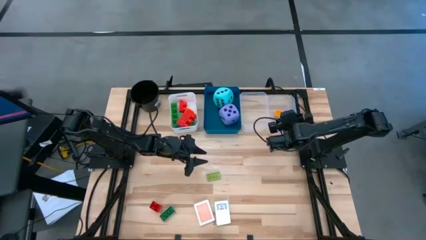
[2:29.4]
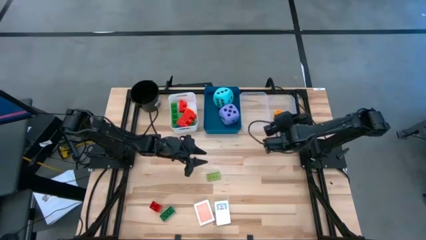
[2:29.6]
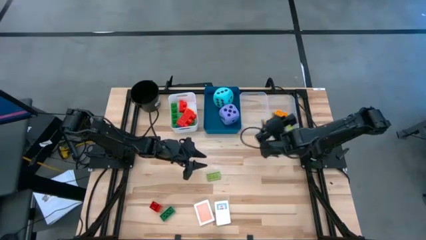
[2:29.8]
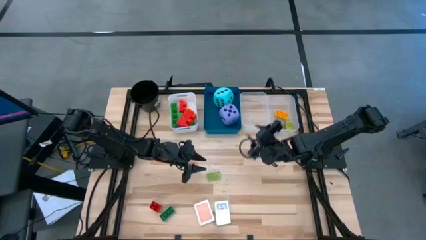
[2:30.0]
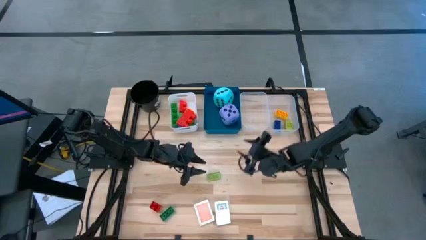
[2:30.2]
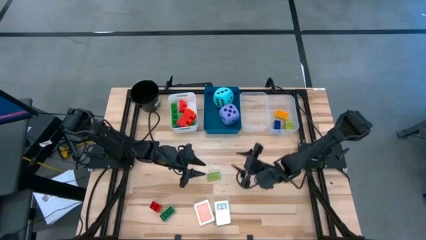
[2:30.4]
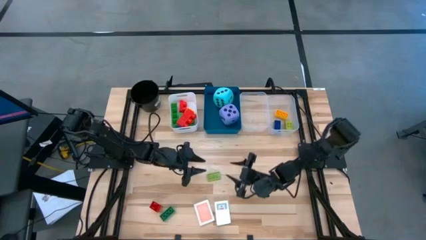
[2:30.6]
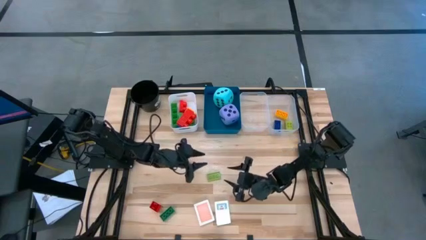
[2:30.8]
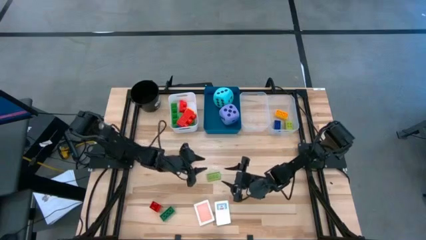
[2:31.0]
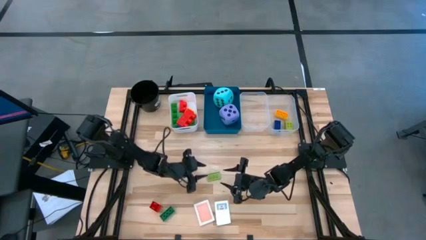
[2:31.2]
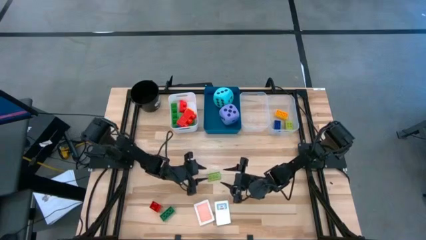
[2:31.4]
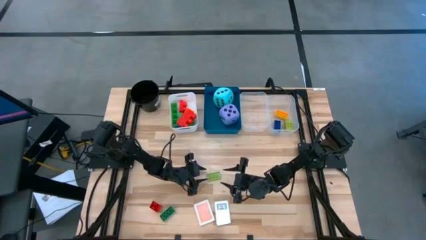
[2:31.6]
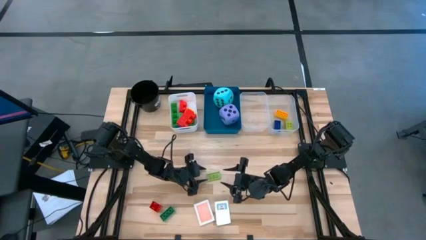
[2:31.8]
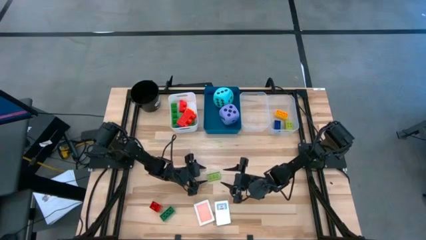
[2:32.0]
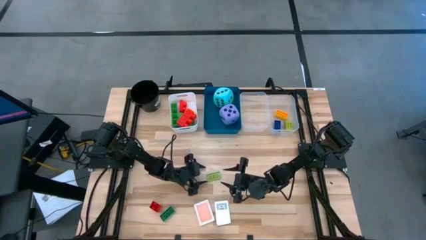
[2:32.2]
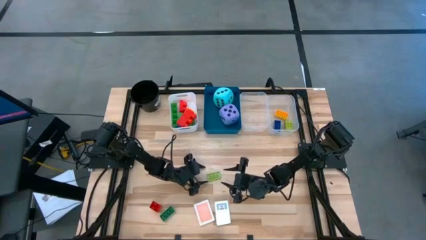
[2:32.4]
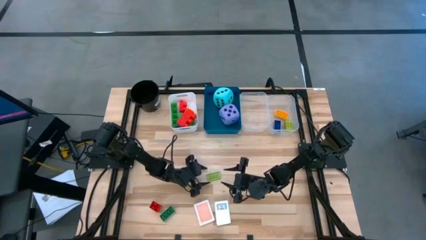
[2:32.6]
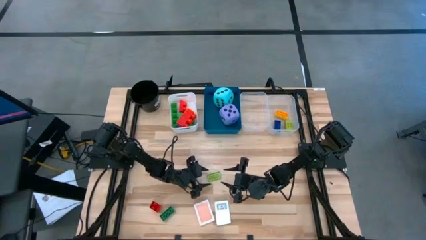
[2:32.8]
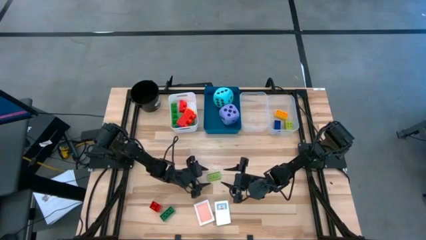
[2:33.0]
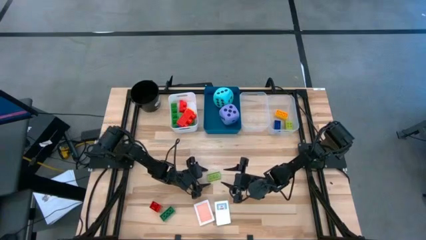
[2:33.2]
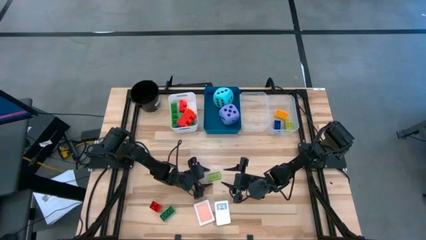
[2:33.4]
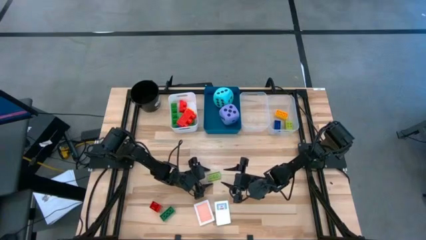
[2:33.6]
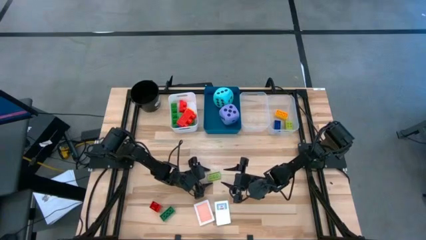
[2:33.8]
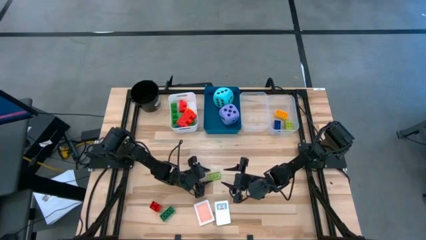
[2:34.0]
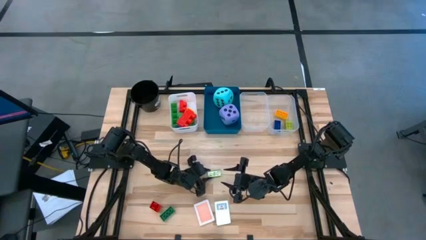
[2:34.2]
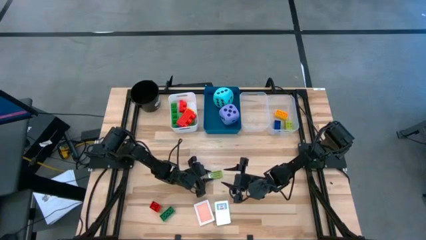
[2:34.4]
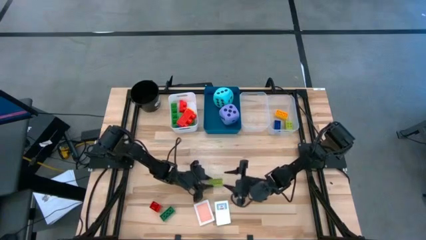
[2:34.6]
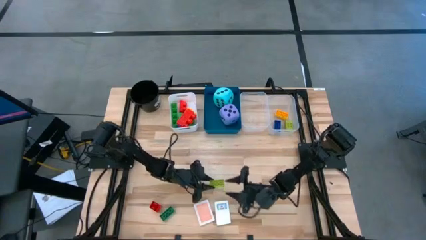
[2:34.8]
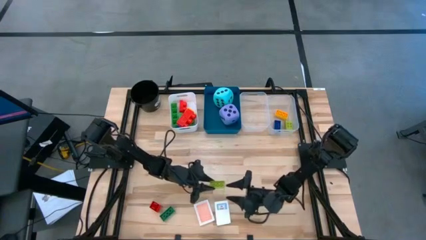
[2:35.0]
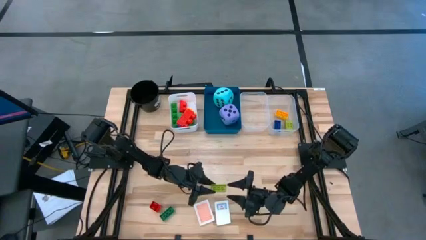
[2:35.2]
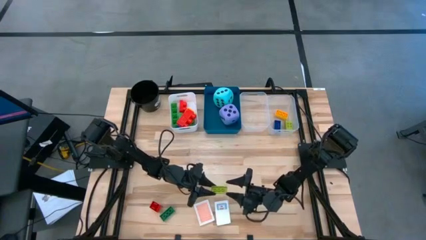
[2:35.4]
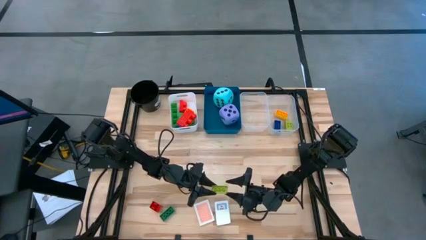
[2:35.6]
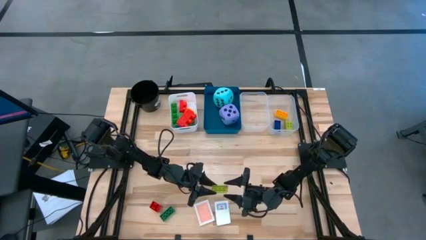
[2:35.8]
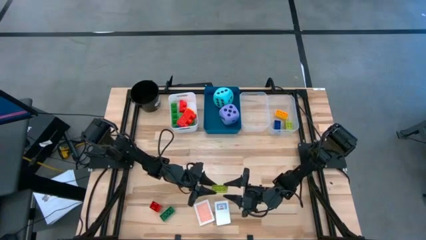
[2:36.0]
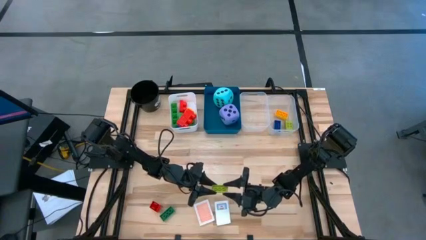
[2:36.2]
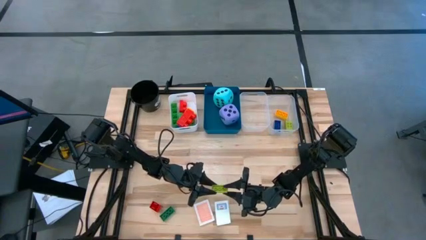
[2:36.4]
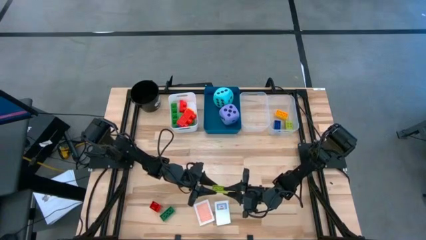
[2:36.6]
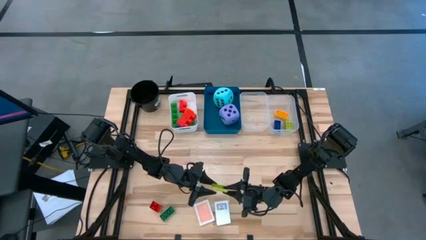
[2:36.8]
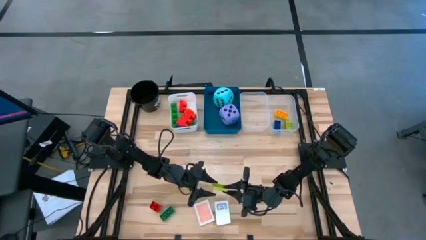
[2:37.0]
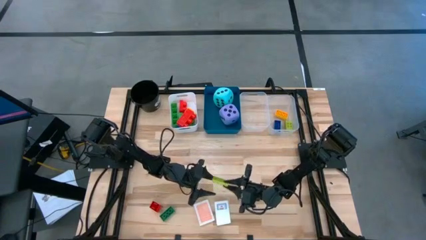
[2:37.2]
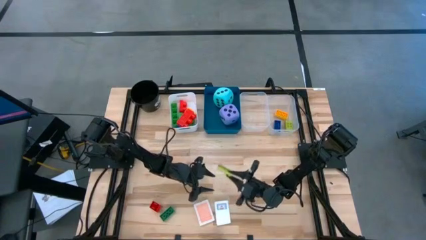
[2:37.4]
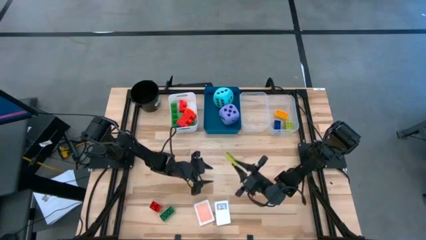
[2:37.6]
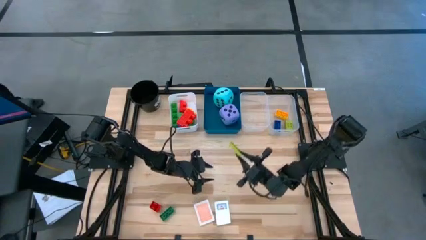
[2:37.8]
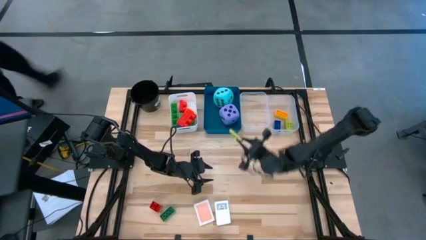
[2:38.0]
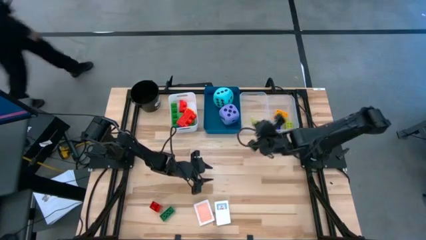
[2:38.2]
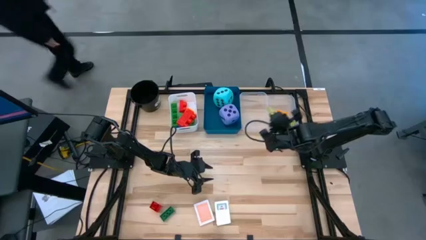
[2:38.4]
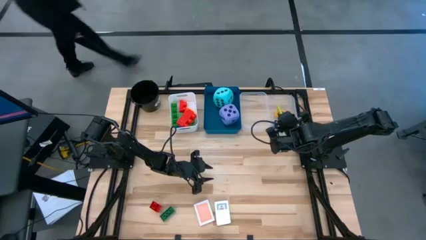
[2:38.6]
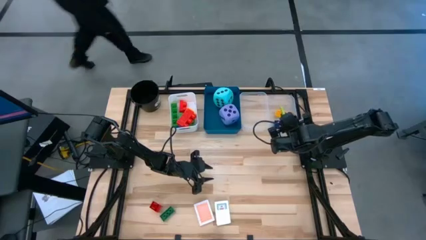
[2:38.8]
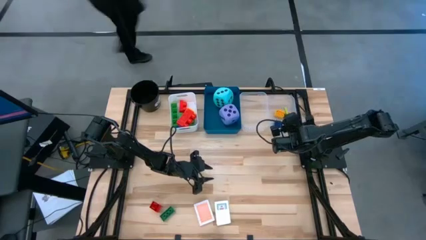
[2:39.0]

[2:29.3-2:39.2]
Task: Pick & Place Toys
Put the small light green game piece into the right transparent bin

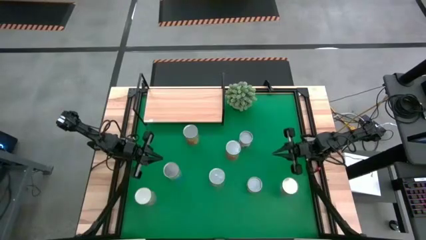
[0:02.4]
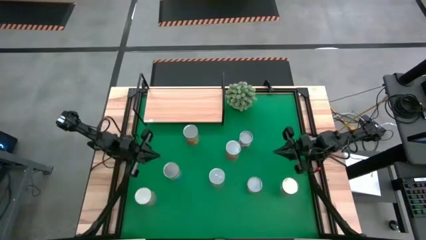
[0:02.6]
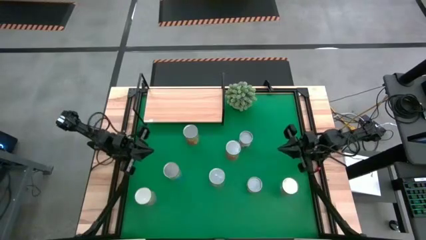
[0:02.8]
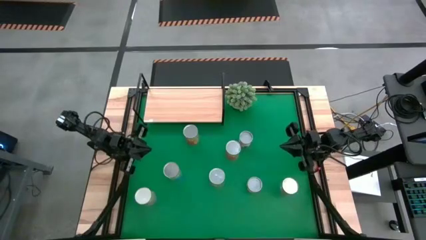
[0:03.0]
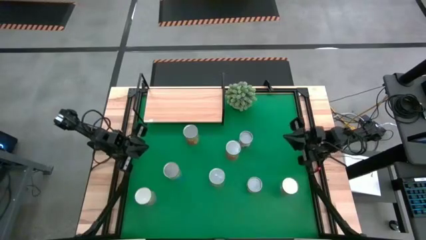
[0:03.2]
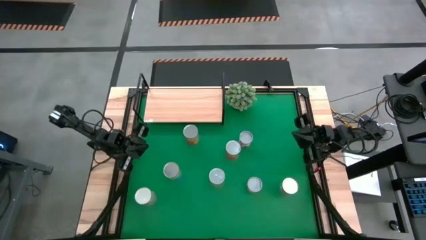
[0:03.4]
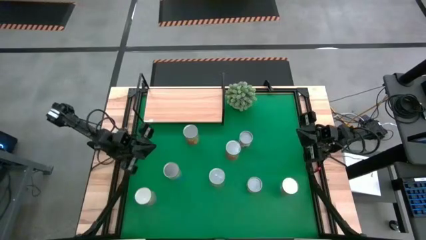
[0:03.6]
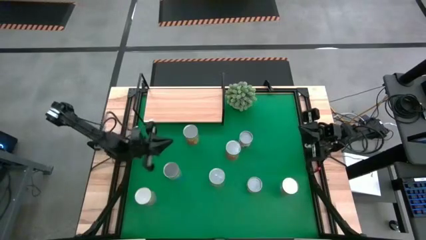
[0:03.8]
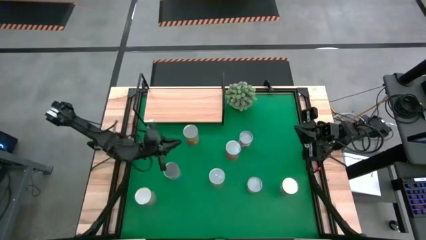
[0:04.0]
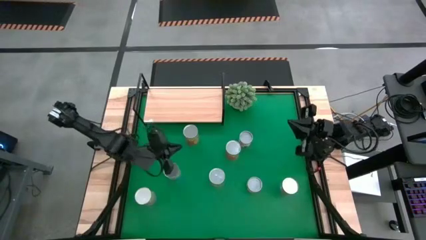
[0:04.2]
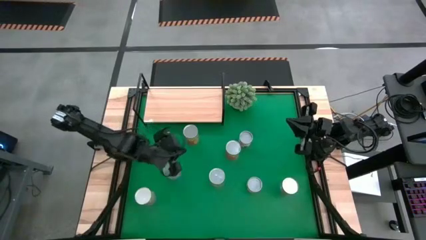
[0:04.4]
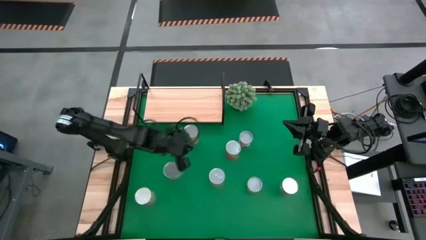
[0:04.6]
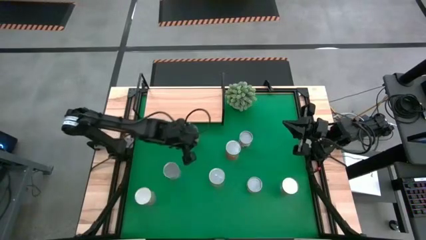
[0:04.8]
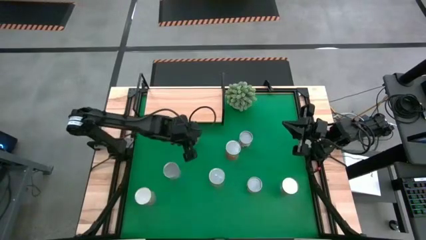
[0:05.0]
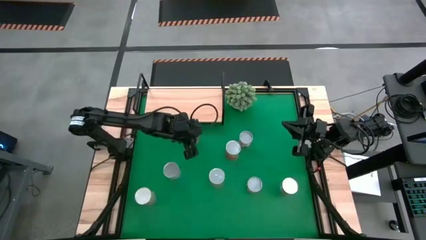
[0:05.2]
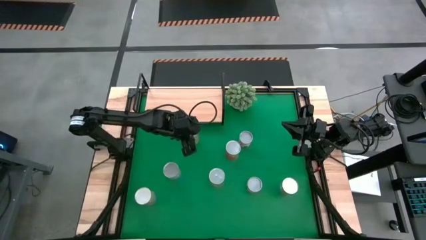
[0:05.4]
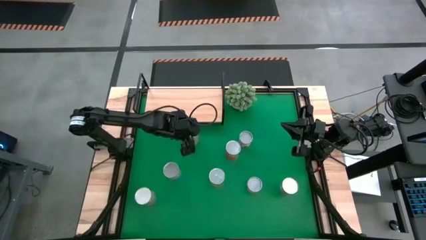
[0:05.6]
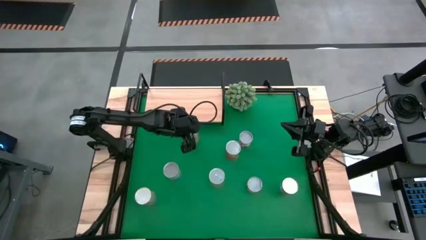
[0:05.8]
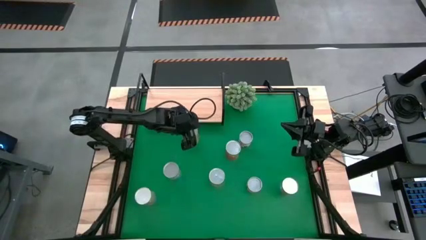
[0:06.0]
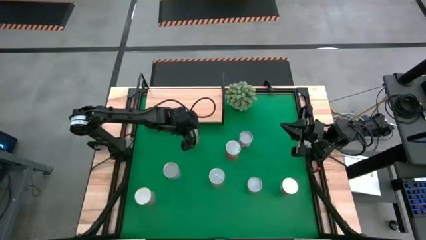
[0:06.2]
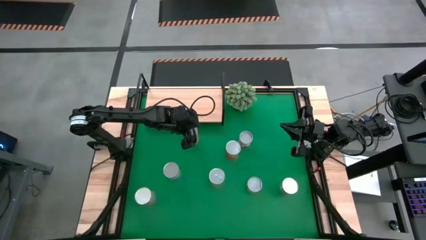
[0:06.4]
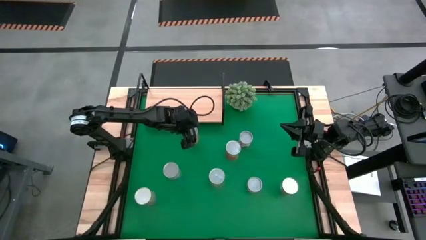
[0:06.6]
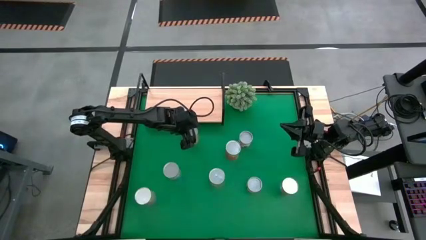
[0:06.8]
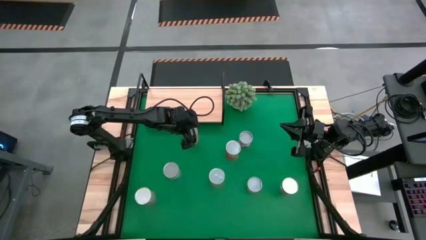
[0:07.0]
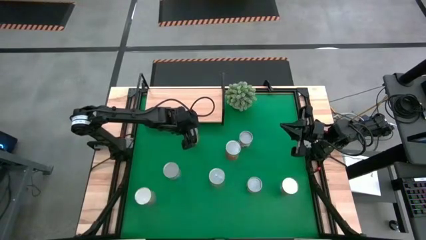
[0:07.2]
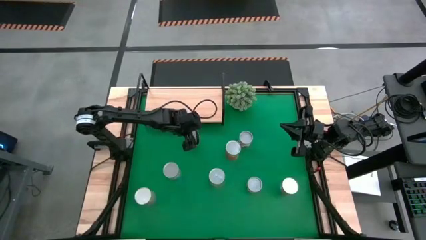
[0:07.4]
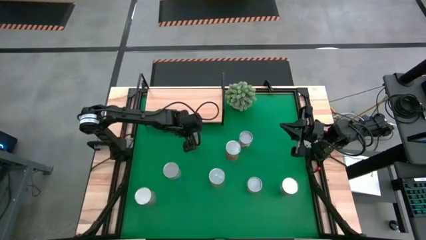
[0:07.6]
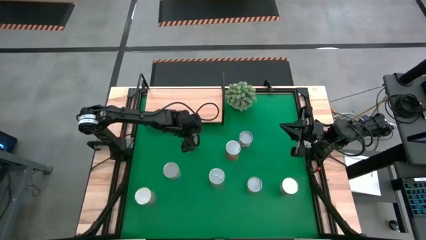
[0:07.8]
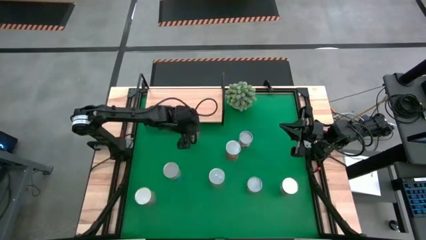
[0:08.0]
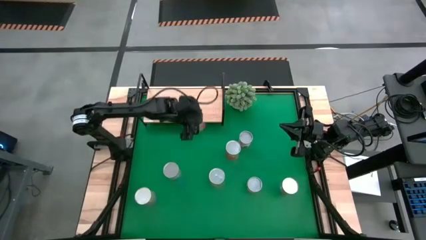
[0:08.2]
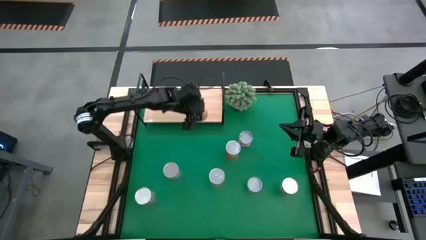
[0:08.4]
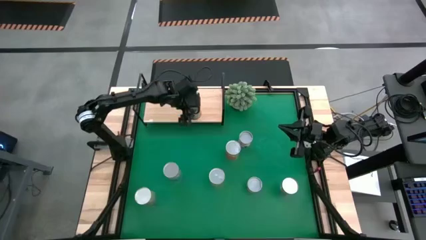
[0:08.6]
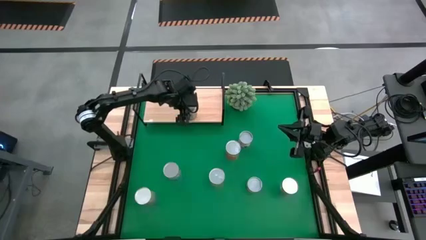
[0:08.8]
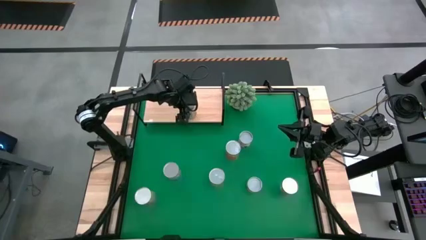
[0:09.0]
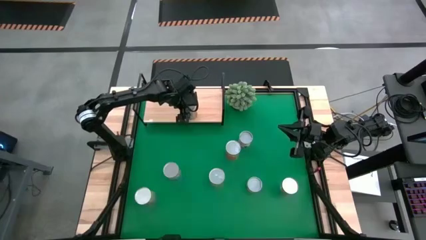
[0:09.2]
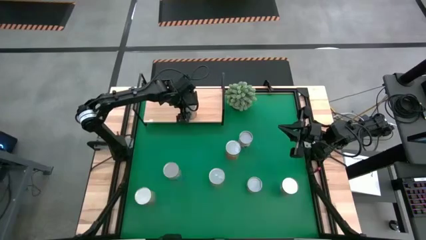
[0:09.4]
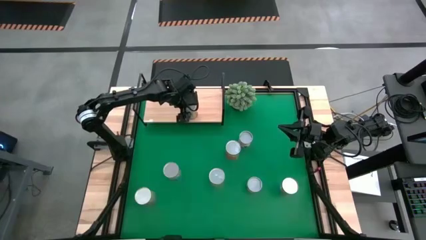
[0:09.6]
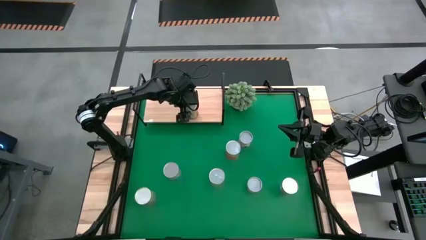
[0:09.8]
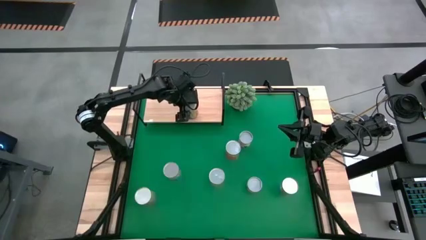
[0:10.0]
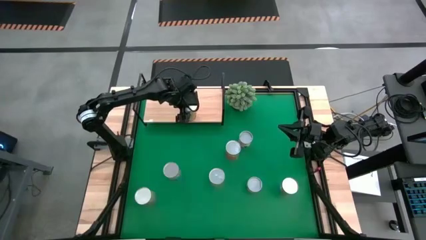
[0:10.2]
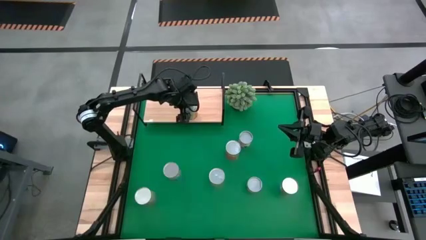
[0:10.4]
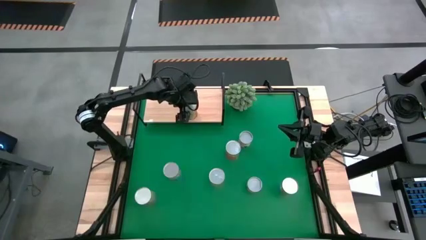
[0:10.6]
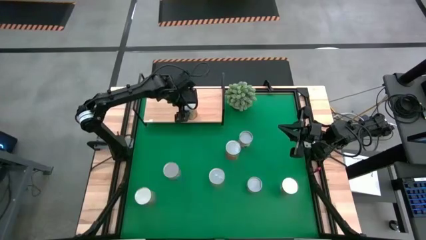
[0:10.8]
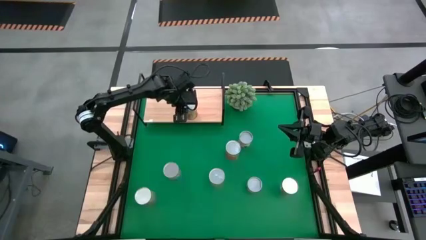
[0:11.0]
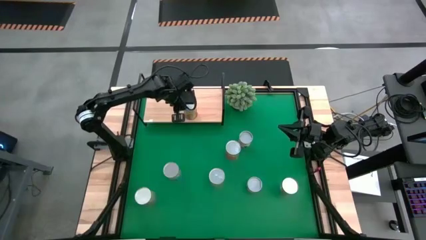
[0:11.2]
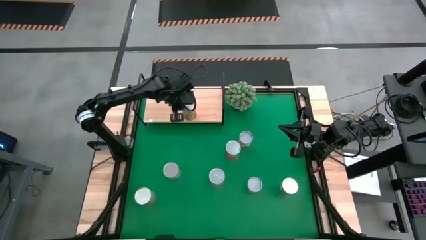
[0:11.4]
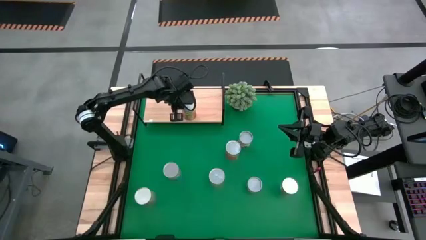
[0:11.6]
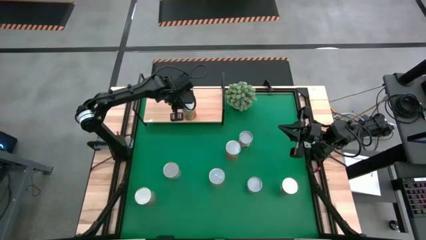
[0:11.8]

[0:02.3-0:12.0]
Task: Pick and place cans onto a shelf
Put the left canned pineapple on the shelf
